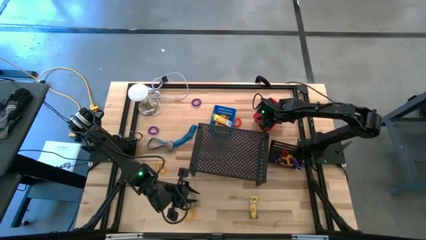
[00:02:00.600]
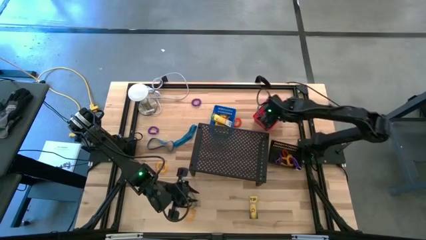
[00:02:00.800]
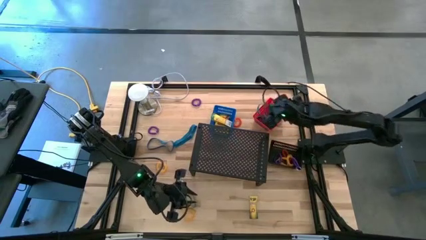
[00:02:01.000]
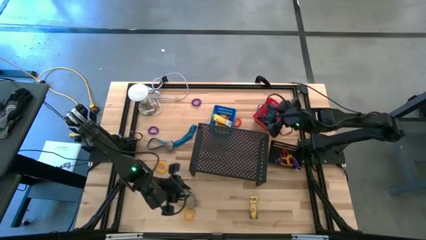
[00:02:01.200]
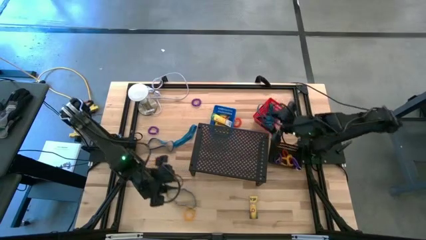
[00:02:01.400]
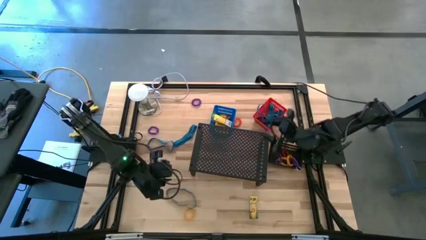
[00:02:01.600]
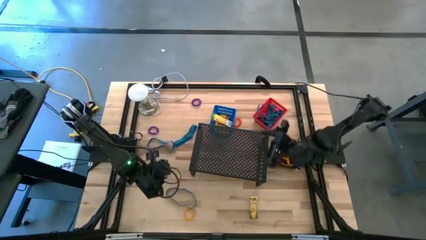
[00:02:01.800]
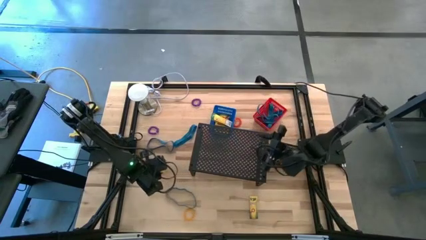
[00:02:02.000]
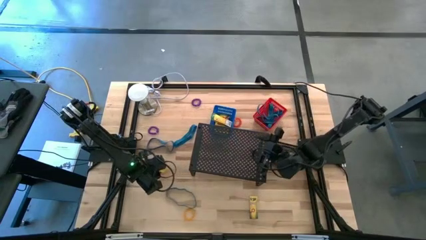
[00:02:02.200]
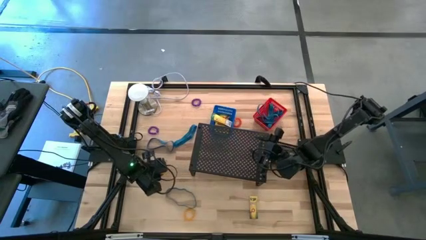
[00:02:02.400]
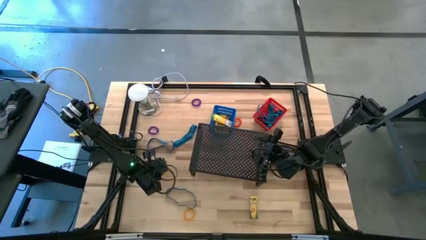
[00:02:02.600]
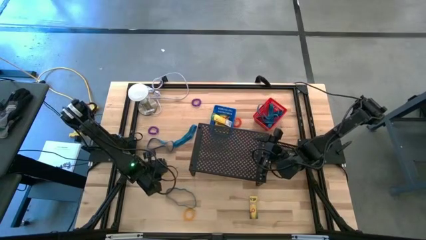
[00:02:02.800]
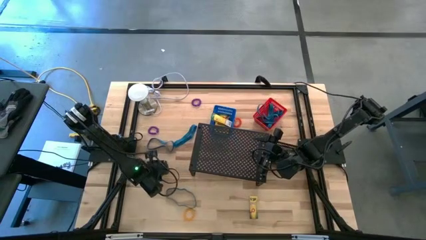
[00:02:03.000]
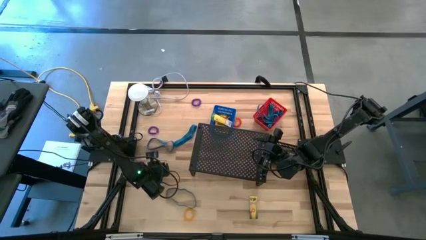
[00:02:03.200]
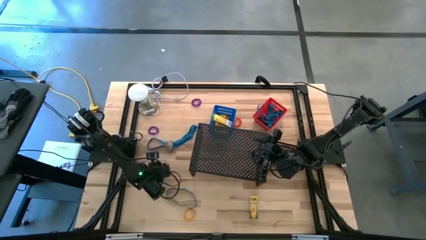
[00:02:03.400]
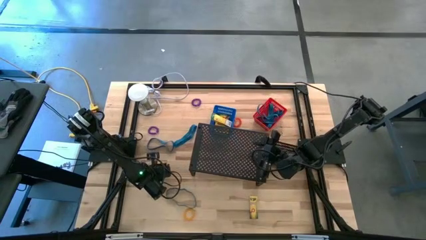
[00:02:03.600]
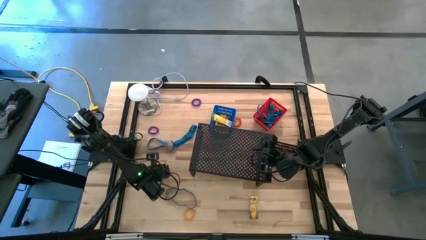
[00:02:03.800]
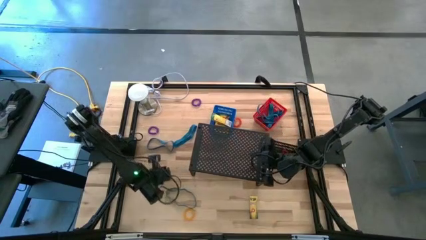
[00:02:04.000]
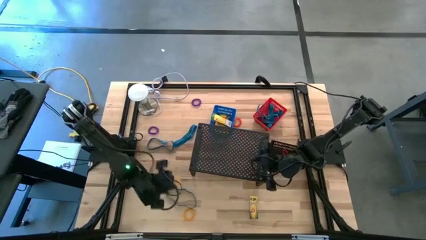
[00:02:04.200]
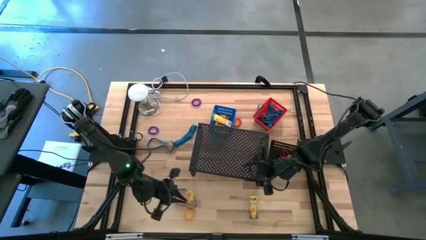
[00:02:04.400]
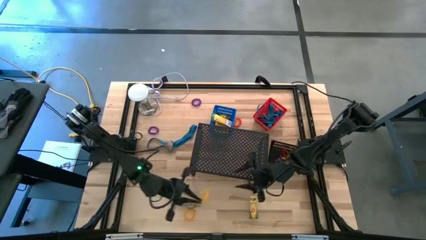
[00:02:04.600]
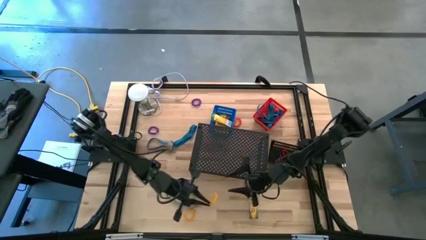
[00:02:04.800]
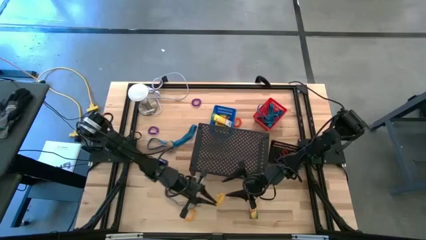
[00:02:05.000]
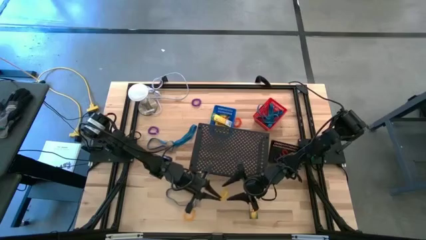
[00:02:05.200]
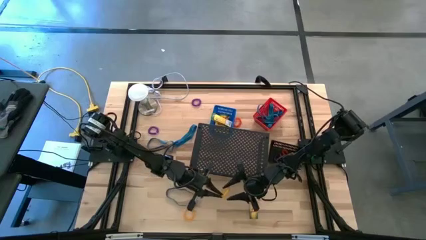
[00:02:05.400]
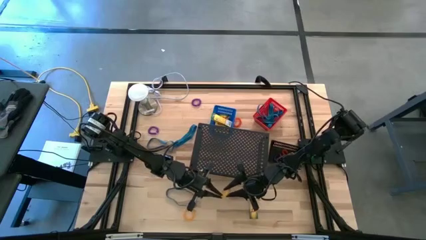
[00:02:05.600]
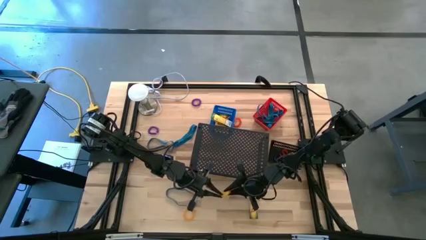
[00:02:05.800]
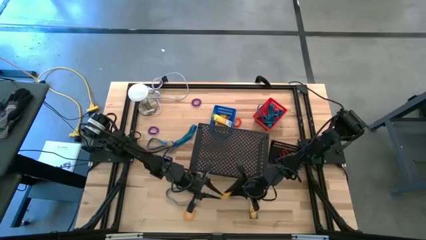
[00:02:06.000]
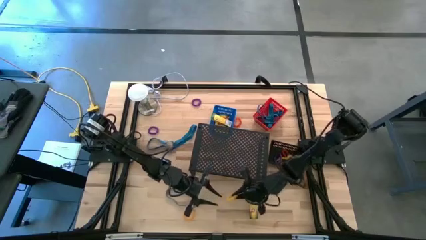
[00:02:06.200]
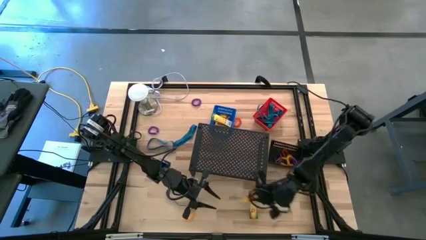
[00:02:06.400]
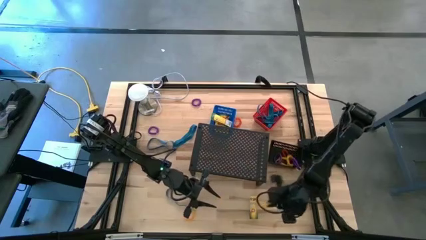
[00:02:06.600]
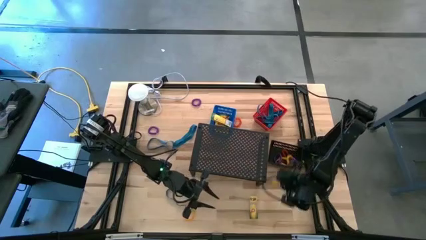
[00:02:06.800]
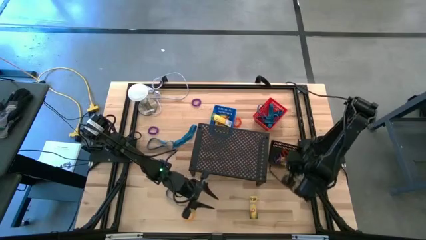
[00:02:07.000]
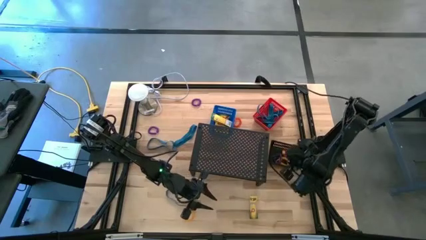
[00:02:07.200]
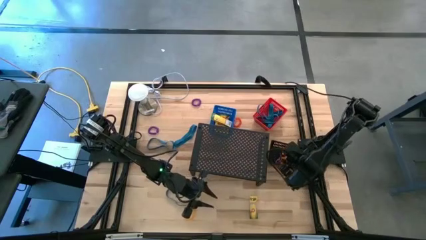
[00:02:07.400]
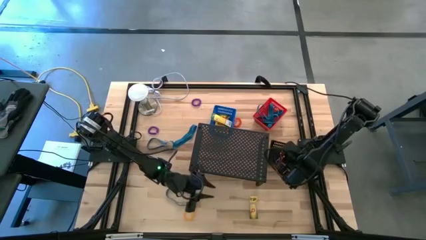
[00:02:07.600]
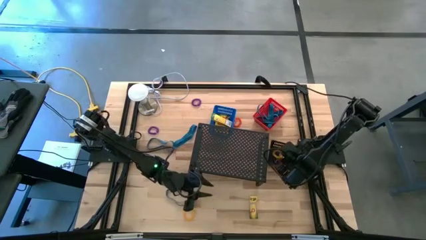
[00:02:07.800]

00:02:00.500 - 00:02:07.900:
Task: Pick & Place Office Desk Supplies
Put the yellow spiral keychain into the black bin

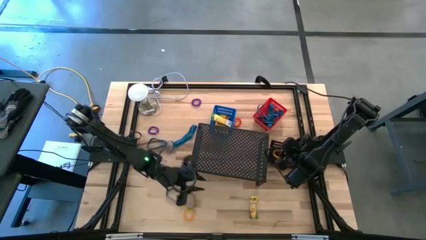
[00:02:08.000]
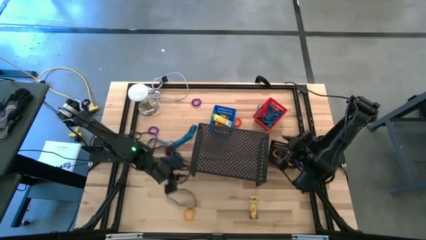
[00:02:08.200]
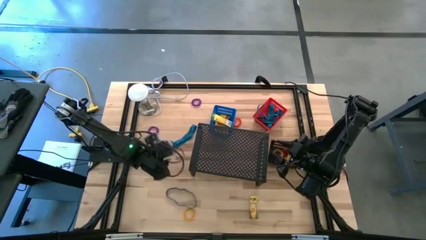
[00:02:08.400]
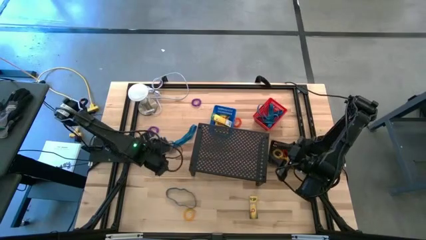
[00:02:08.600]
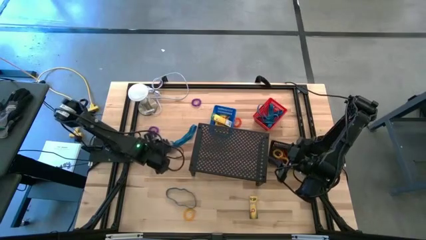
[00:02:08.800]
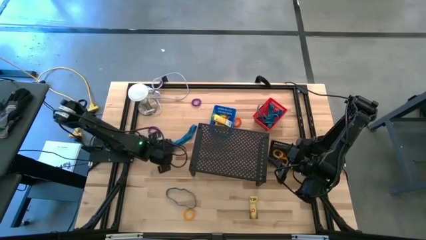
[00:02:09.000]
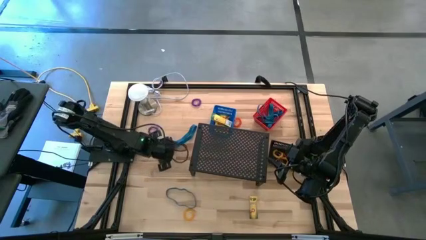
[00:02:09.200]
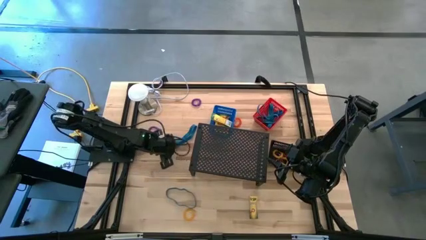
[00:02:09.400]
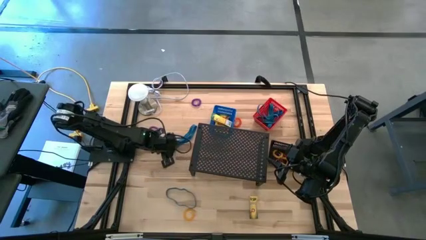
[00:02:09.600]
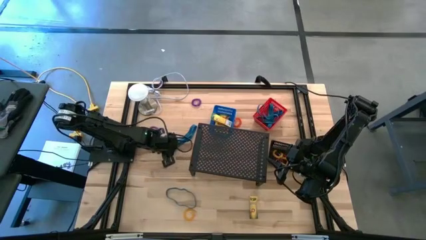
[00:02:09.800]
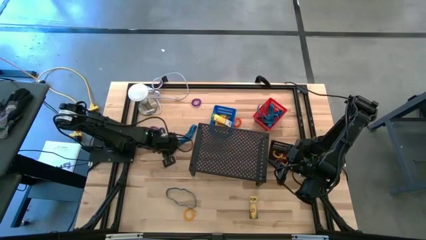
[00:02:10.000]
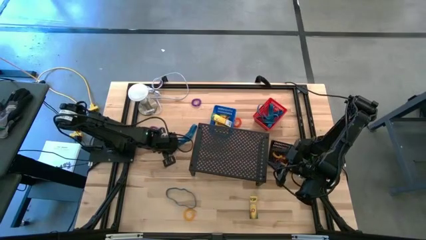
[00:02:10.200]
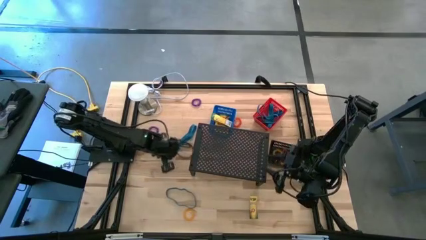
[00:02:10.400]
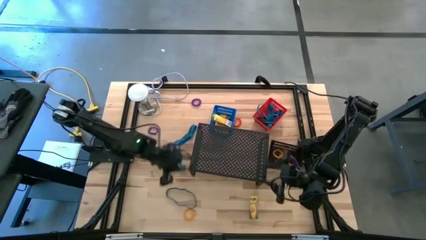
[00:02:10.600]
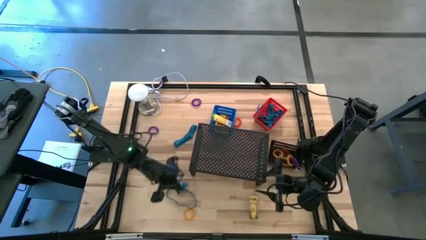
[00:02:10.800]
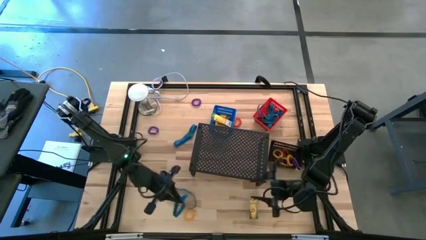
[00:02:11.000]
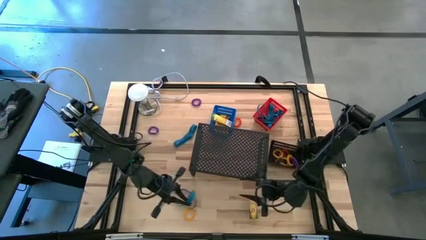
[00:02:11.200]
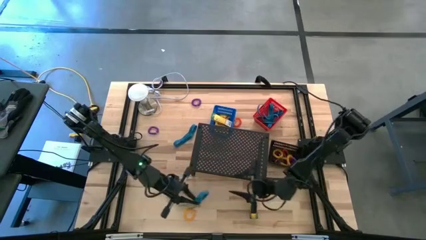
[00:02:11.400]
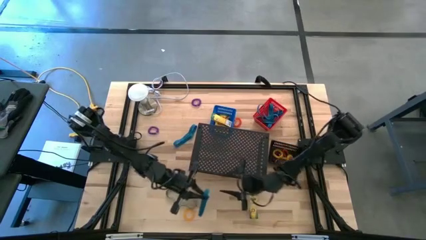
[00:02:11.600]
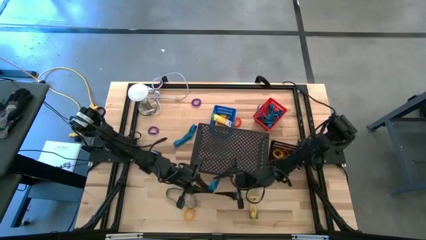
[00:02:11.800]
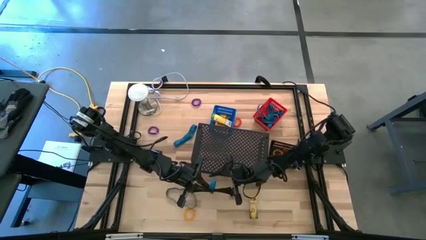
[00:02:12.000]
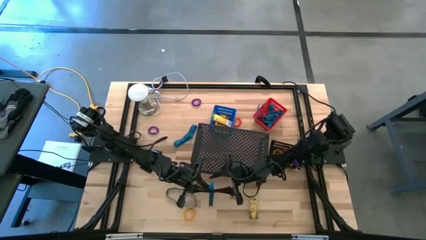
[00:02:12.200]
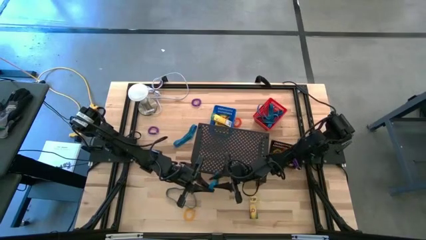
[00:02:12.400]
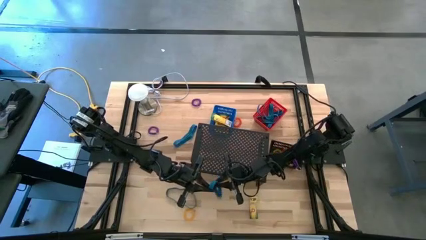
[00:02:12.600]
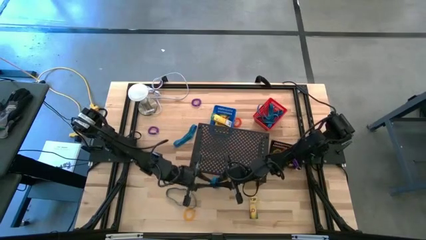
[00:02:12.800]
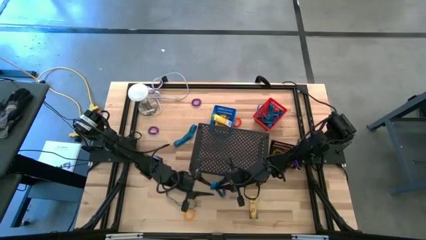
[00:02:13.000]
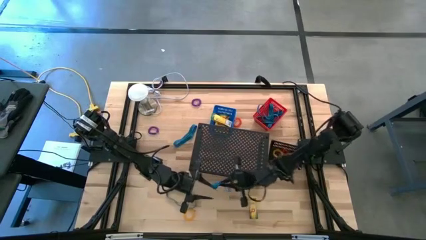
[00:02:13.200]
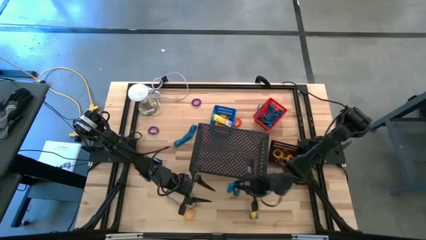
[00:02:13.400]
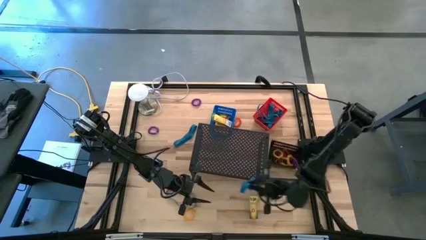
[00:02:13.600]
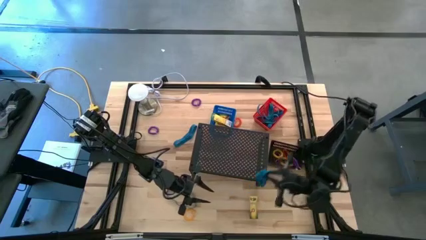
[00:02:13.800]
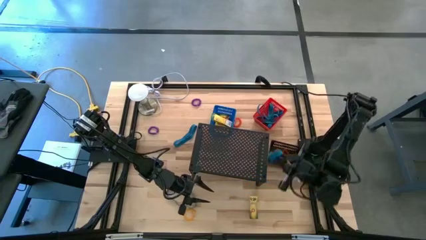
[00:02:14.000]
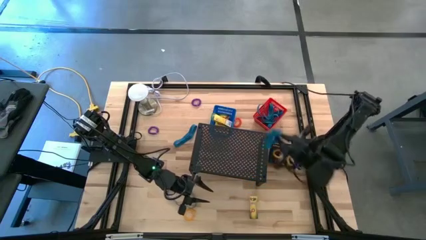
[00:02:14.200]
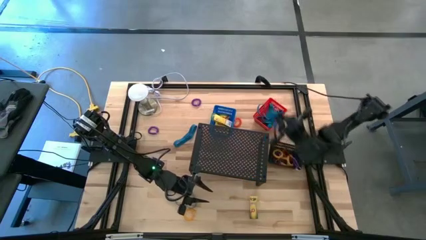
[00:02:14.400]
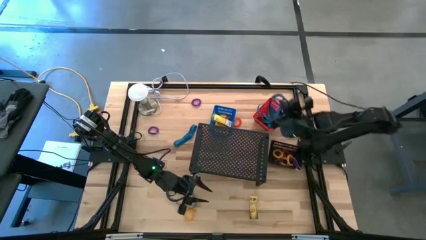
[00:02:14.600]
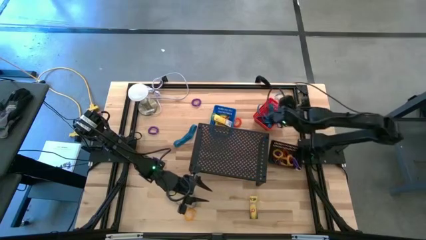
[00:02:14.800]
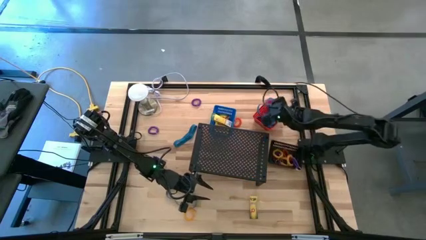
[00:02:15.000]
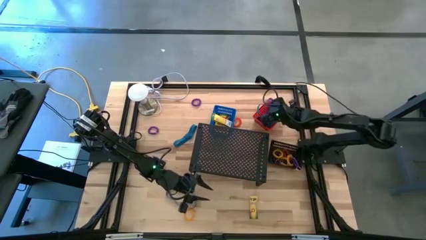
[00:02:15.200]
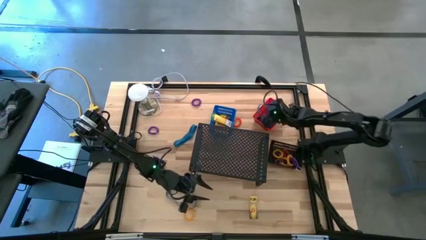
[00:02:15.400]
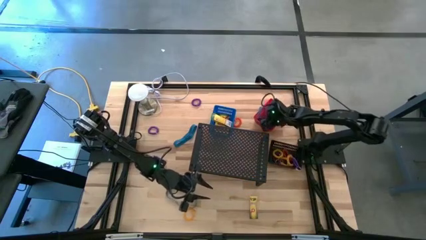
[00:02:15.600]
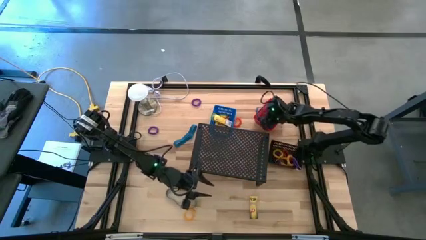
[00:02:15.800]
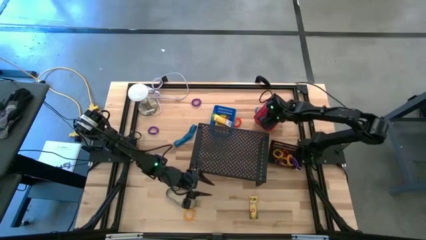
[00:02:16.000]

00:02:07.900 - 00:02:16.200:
Put the blue rubber band into the red bin
